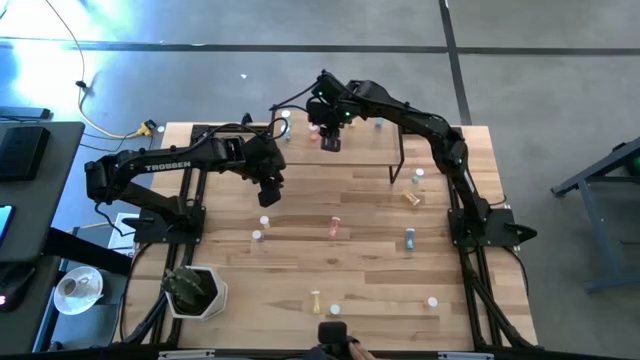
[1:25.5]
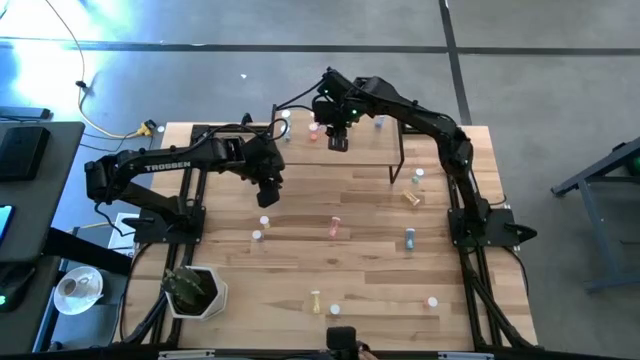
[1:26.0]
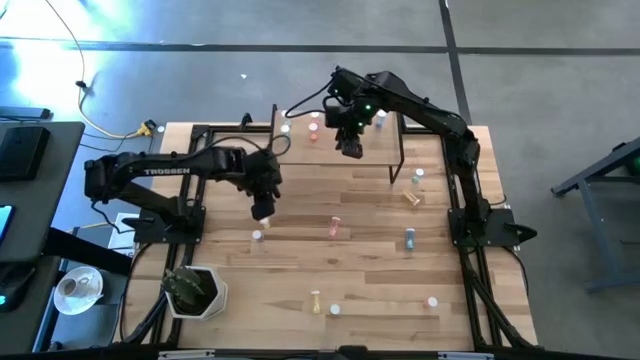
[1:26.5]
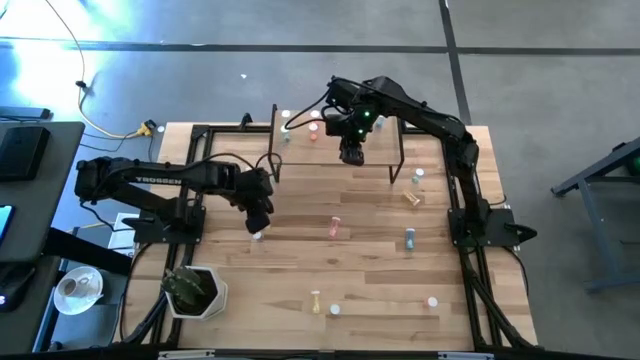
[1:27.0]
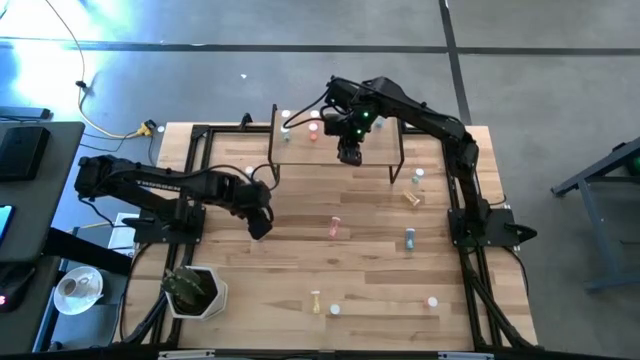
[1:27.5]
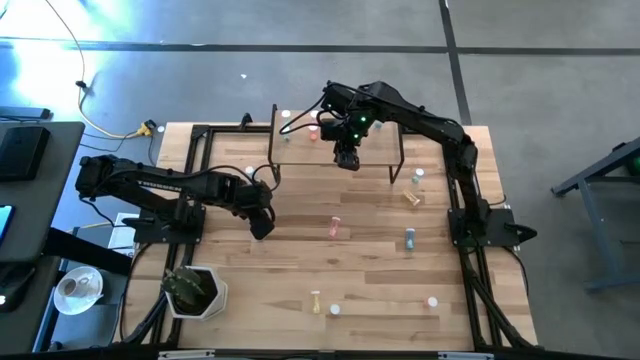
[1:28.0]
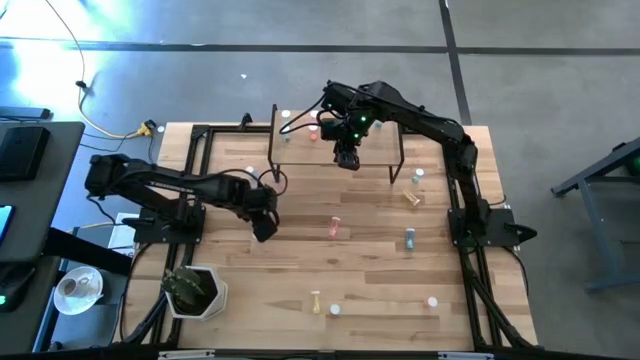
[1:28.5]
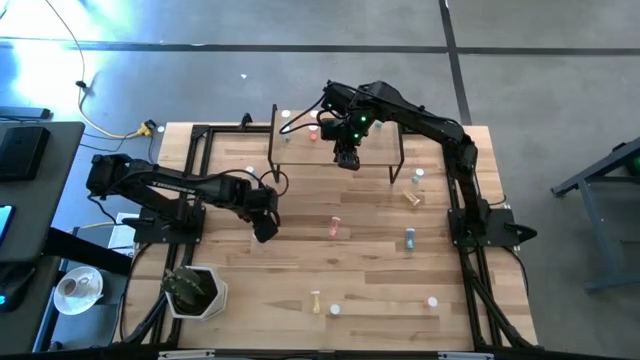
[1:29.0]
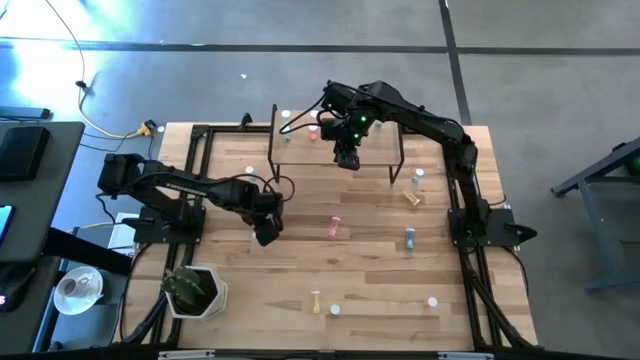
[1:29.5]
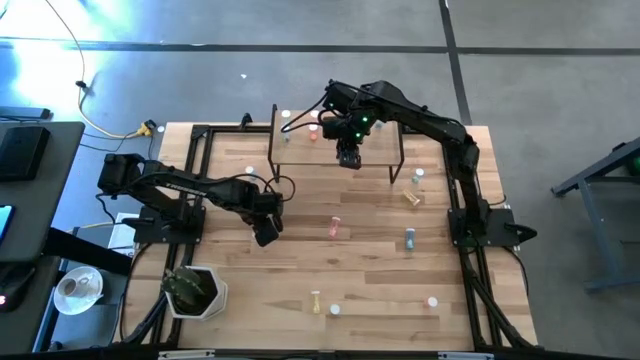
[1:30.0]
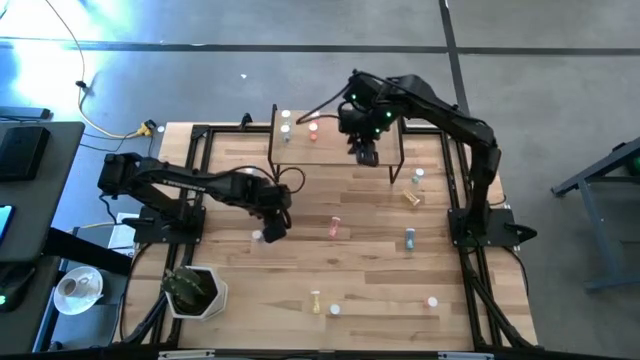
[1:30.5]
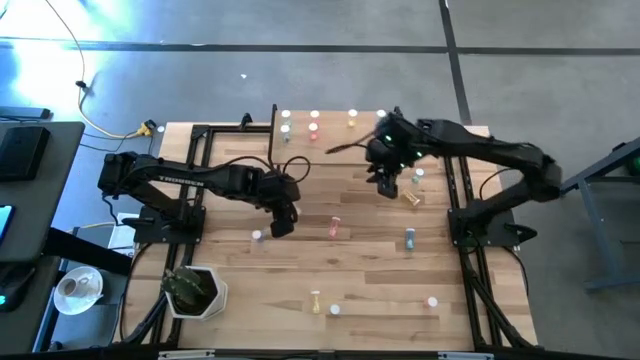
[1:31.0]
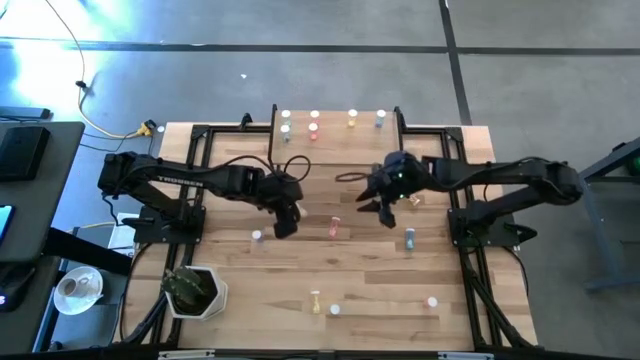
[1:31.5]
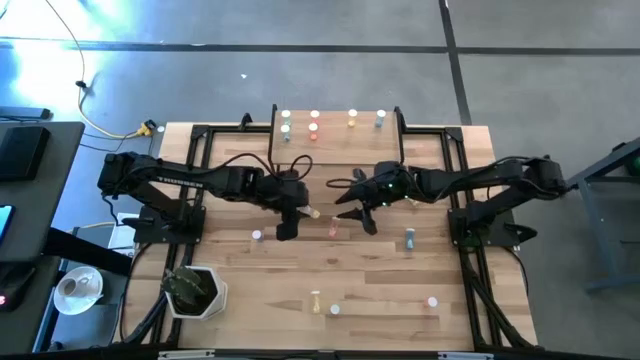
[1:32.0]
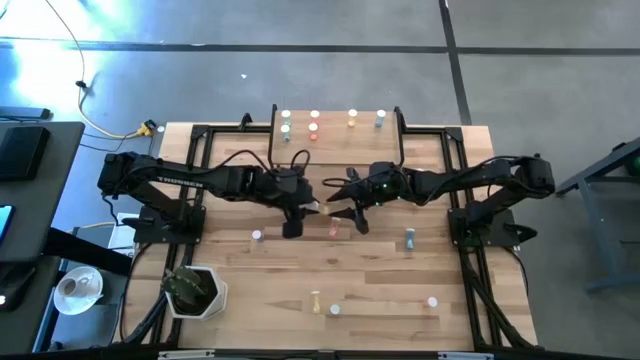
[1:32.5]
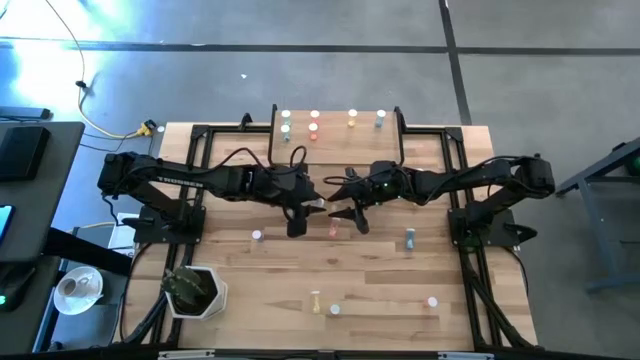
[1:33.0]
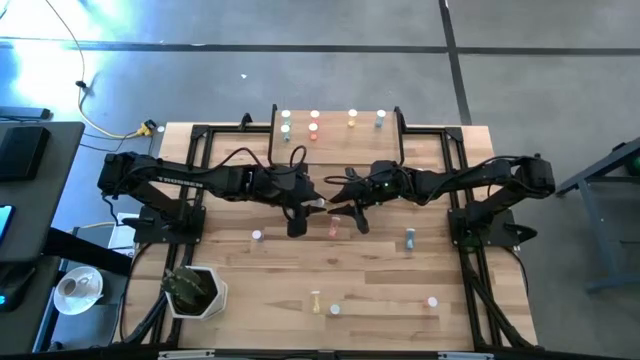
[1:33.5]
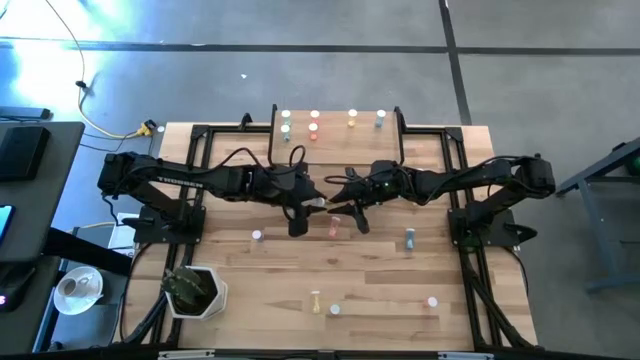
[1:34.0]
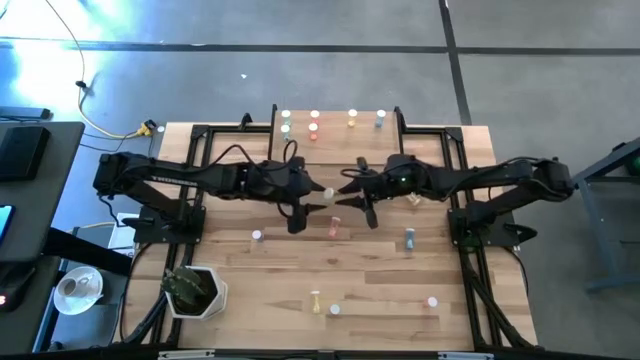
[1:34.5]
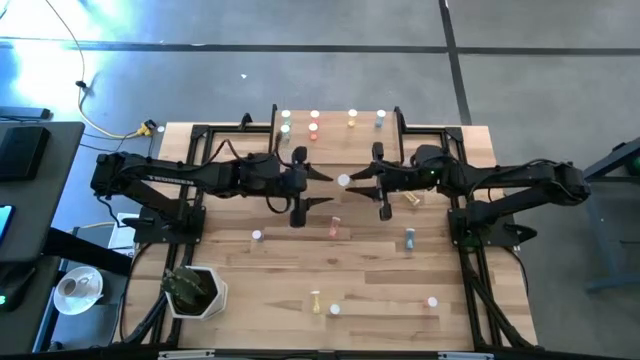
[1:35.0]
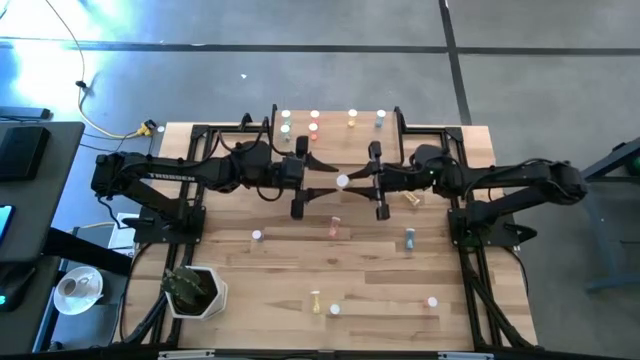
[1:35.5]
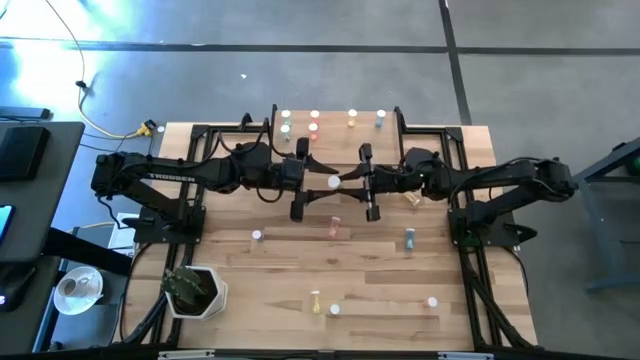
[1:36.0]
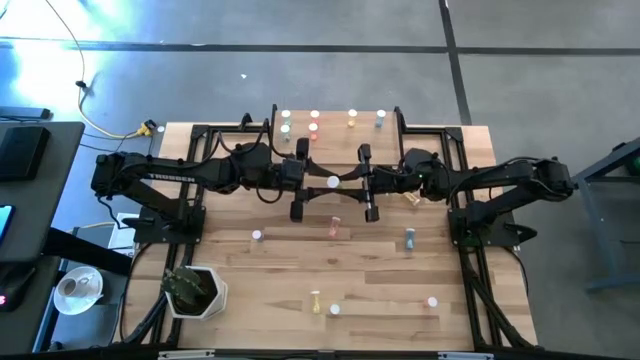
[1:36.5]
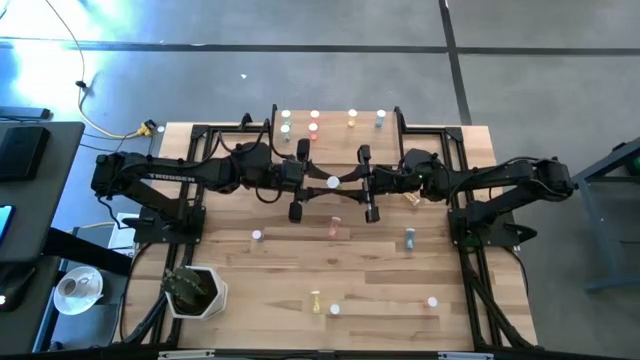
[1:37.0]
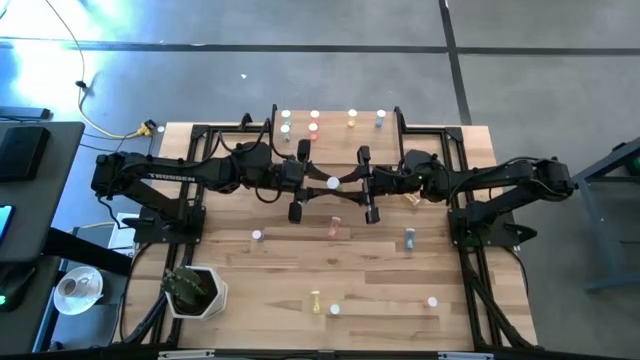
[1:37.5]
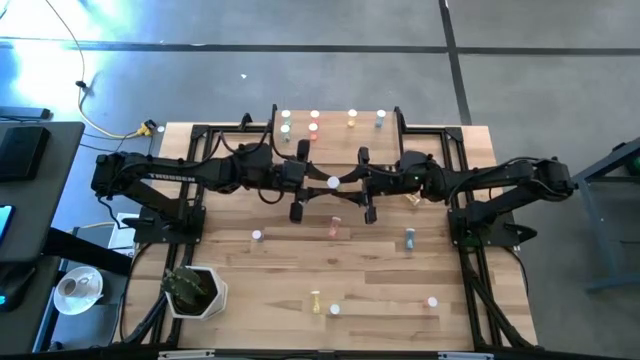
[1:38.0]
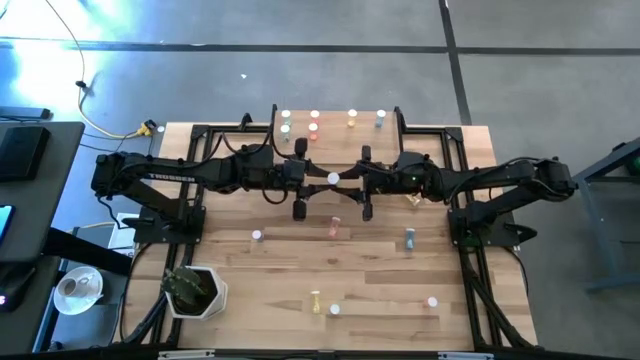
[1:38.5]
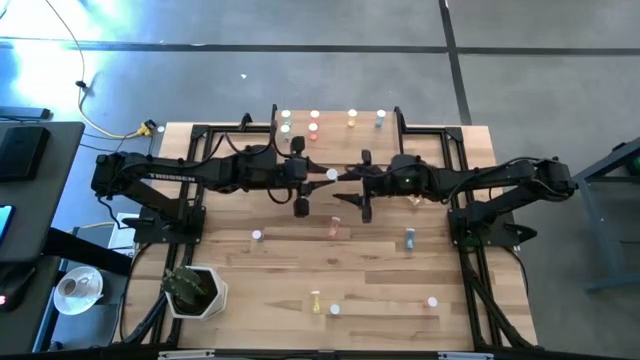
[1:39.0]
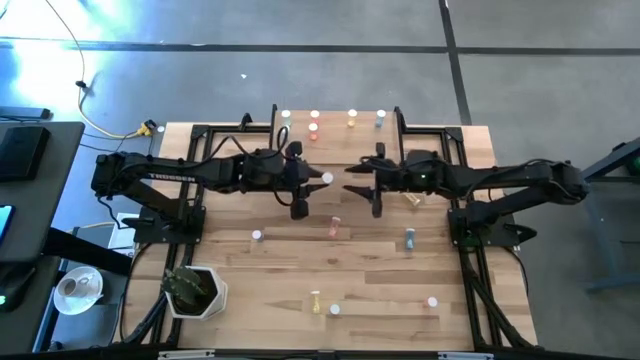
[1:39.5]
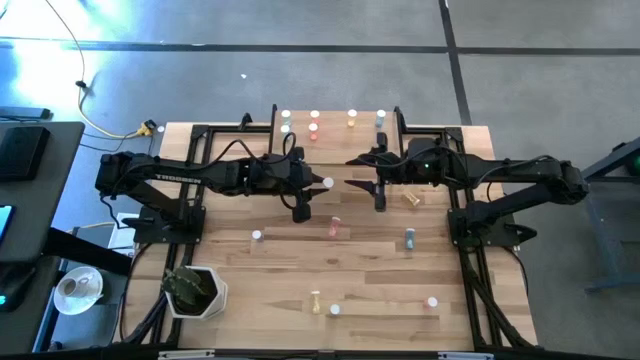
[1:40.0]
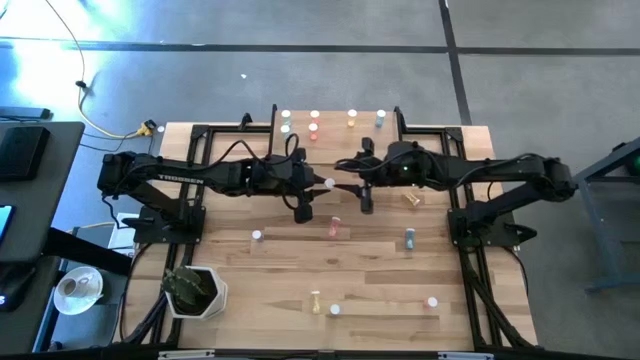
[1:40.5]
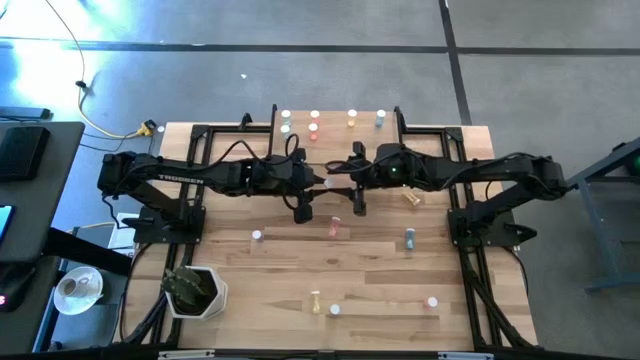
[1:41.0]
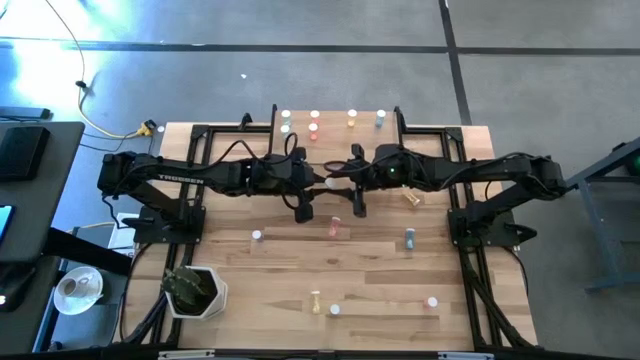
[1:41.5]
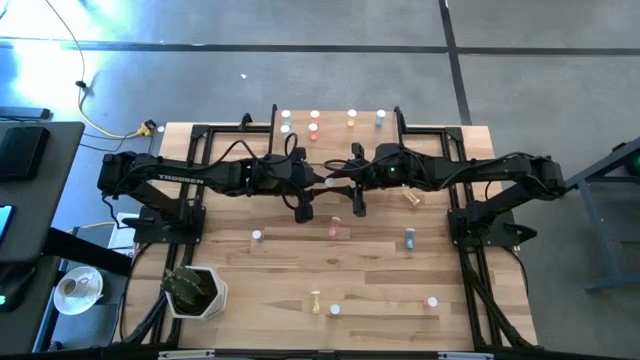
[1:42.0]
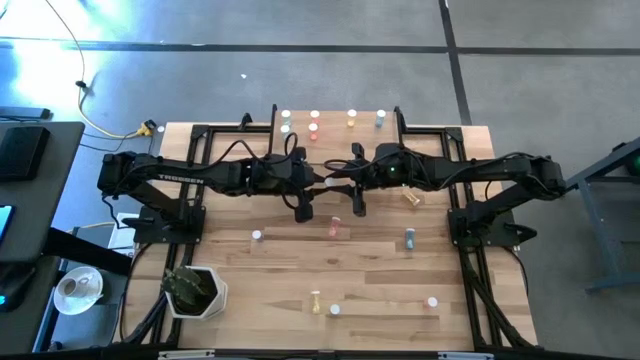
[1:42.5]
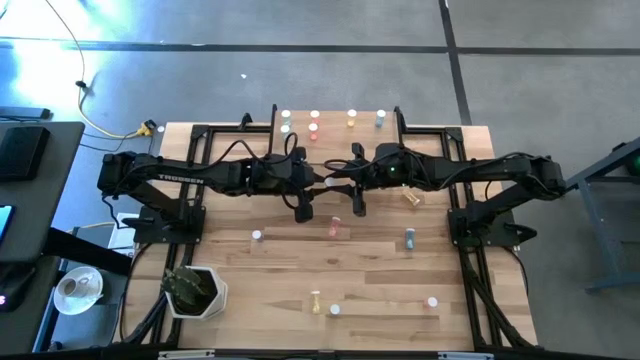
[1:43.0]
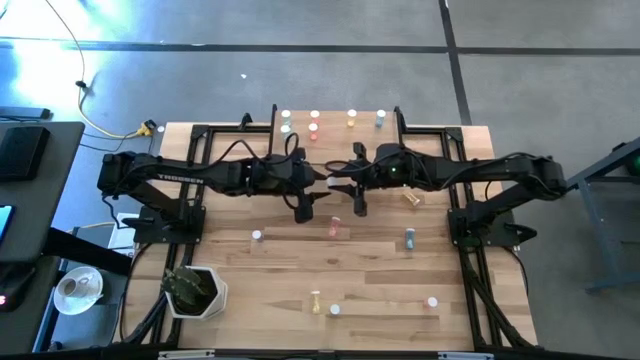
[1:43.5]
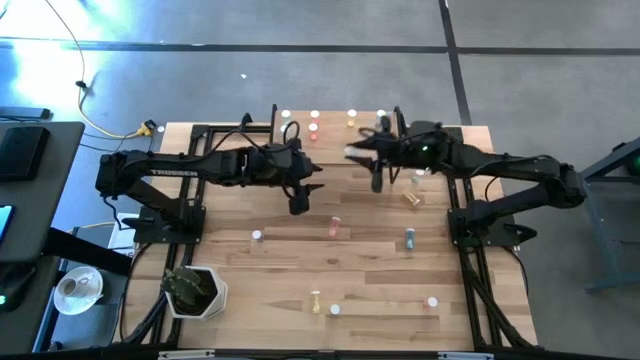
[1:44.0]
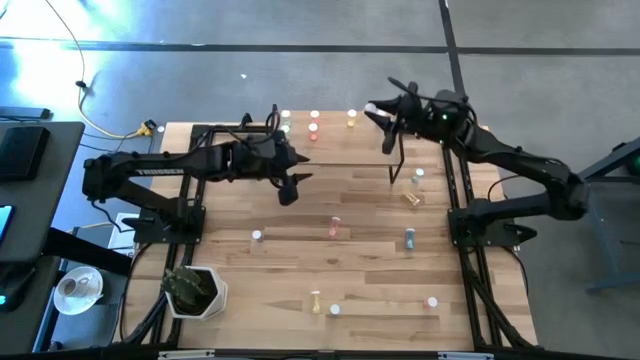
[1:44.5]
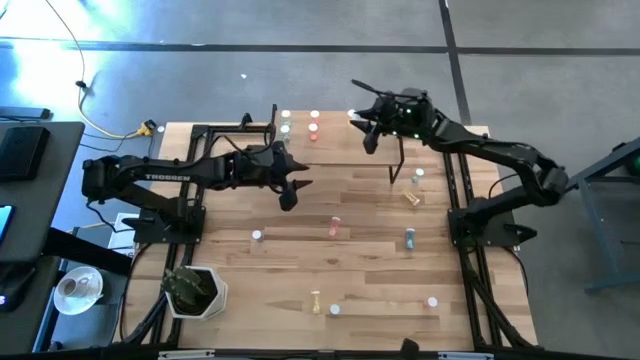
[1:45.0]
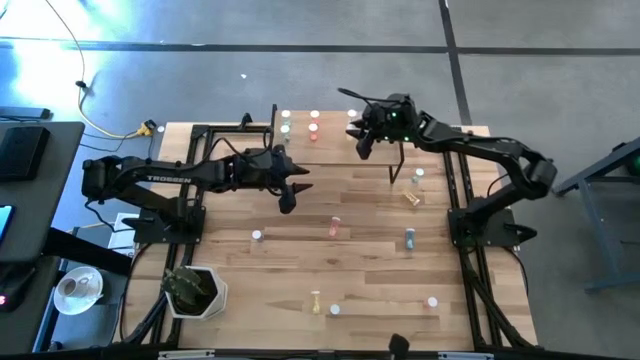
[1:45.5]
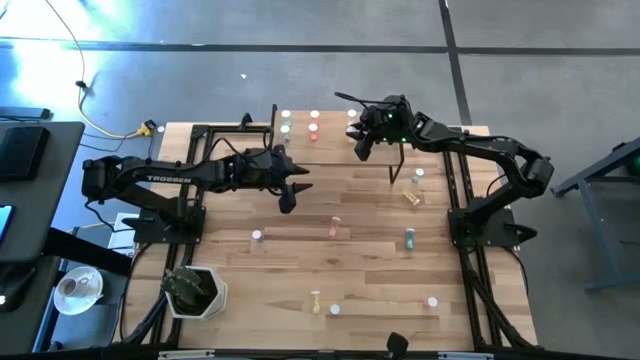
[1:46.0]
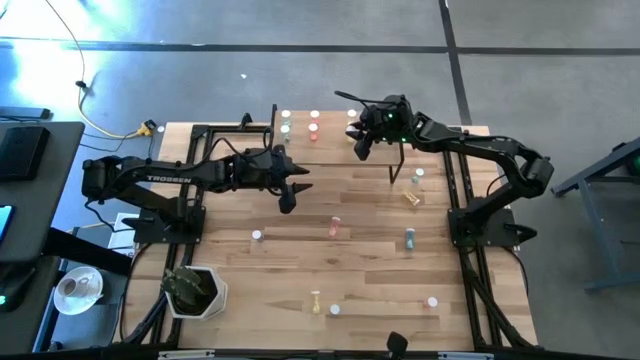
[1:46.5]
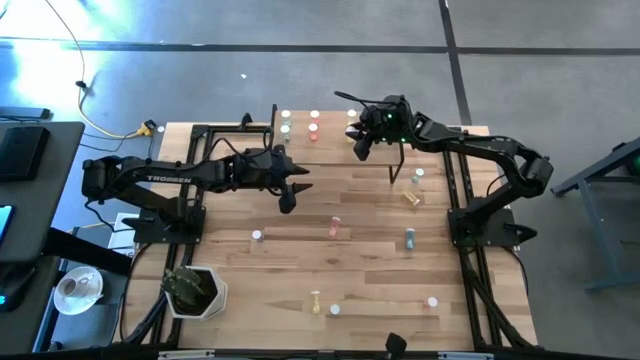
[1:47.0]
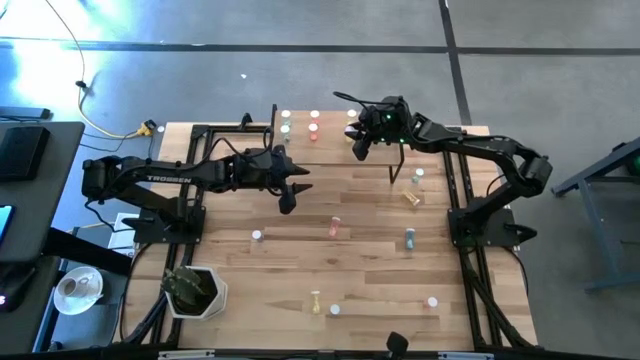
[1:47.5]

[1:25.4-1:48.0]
Task: Pick and place medicine bottles onto shelf by color
Put the yellow pill bottle on the shelf
